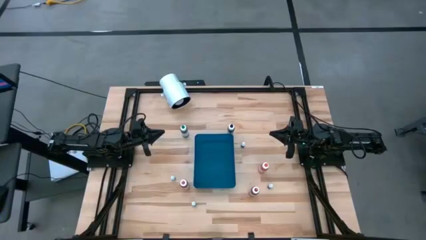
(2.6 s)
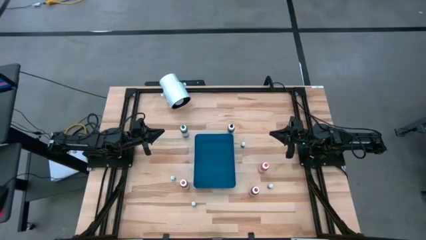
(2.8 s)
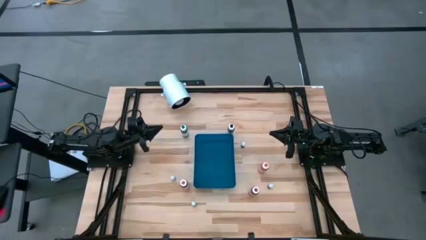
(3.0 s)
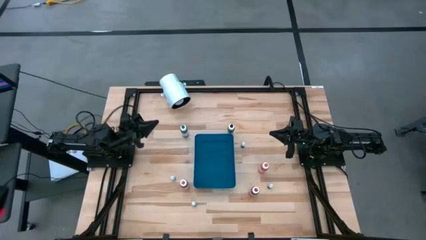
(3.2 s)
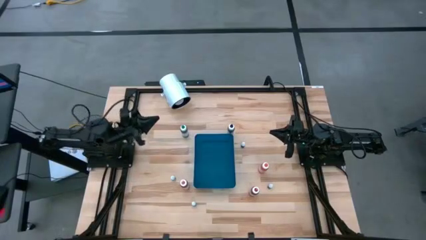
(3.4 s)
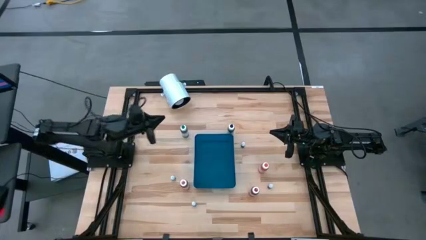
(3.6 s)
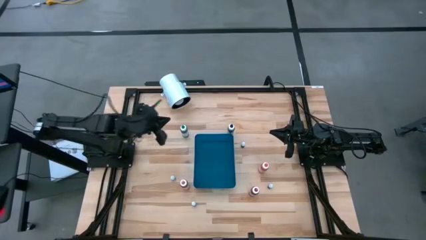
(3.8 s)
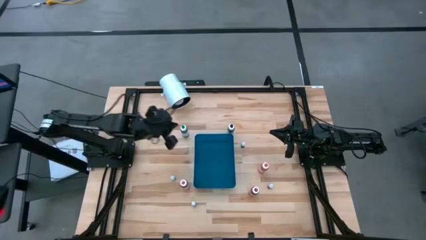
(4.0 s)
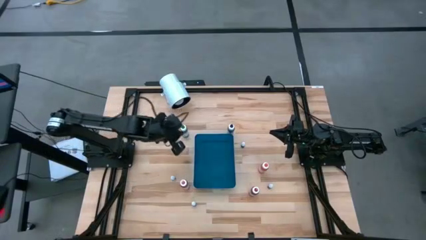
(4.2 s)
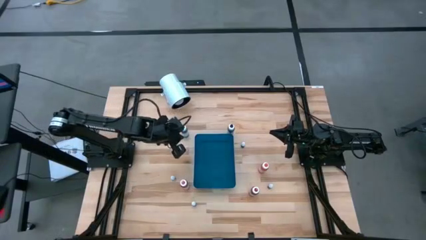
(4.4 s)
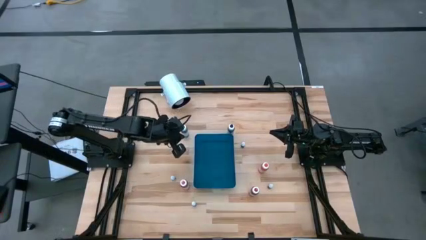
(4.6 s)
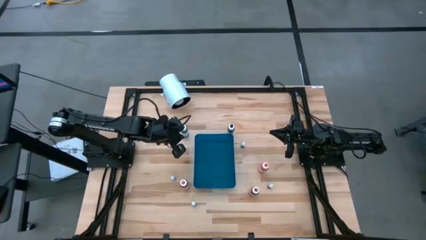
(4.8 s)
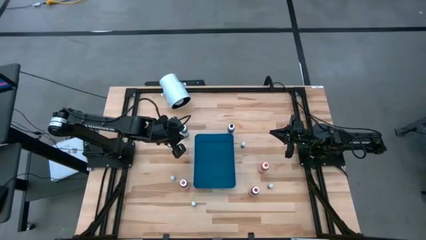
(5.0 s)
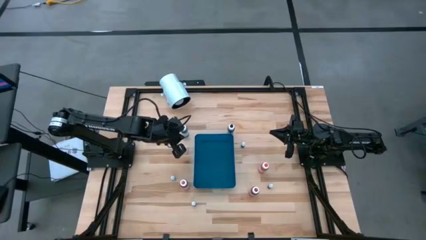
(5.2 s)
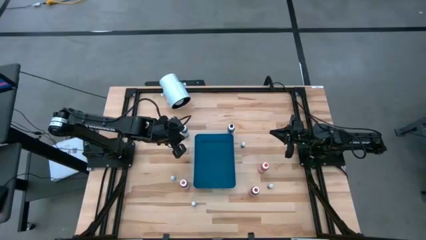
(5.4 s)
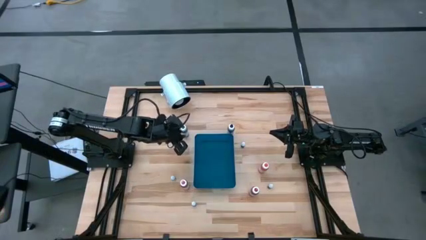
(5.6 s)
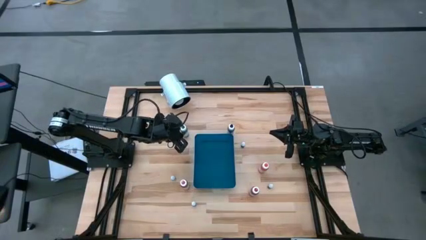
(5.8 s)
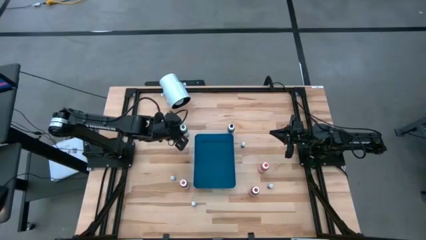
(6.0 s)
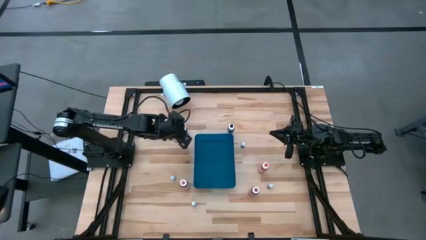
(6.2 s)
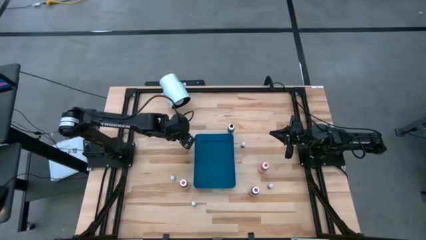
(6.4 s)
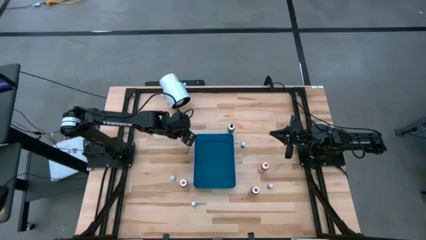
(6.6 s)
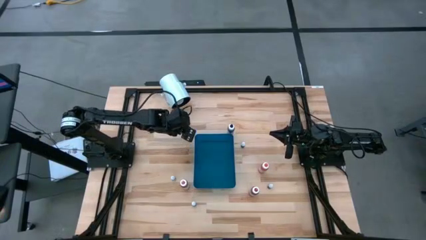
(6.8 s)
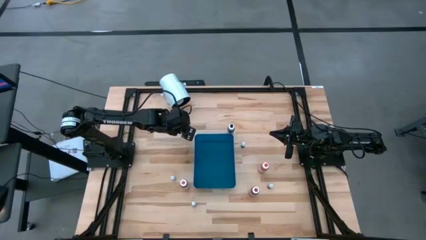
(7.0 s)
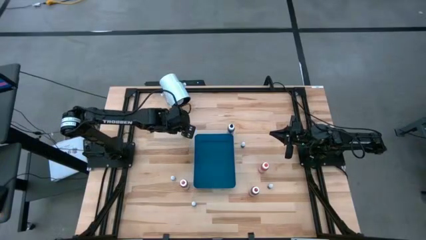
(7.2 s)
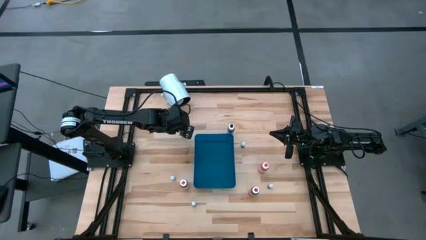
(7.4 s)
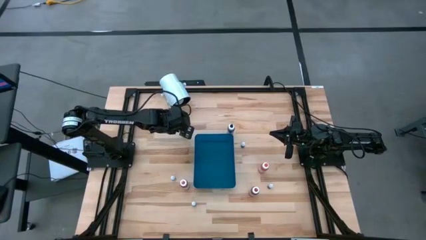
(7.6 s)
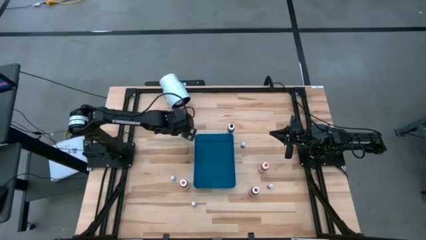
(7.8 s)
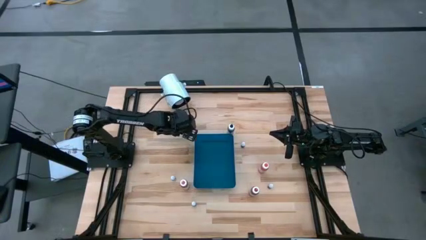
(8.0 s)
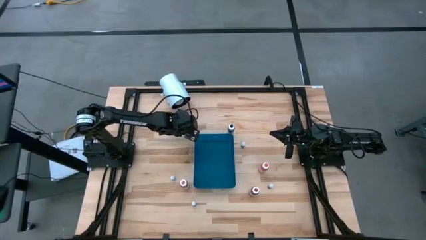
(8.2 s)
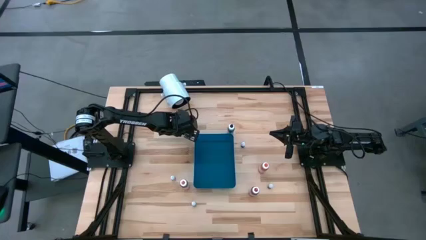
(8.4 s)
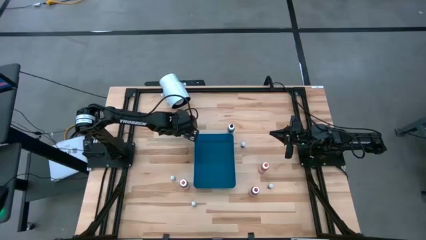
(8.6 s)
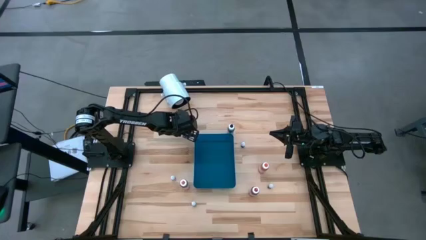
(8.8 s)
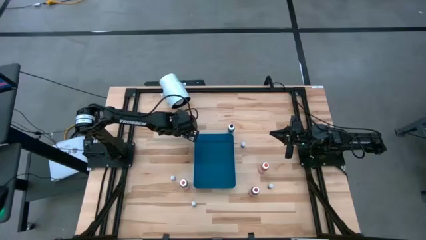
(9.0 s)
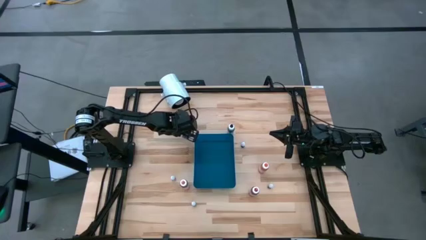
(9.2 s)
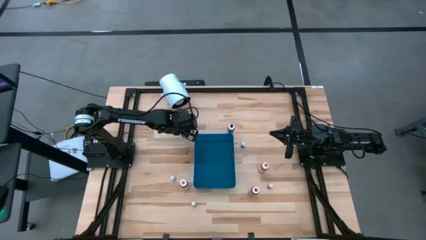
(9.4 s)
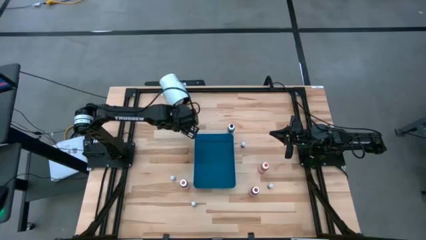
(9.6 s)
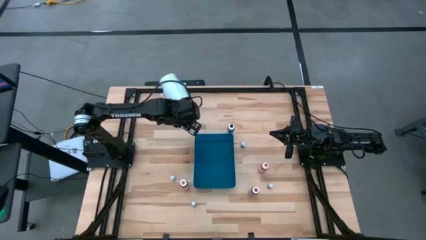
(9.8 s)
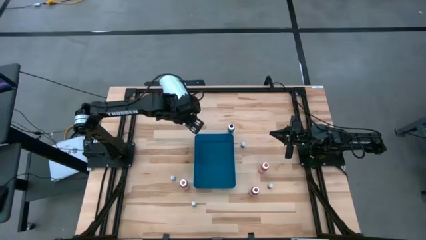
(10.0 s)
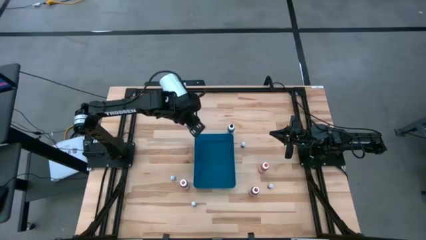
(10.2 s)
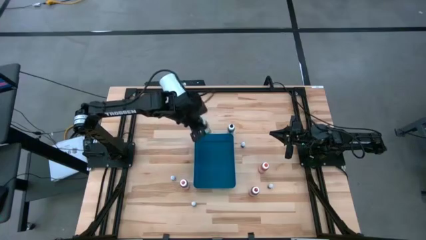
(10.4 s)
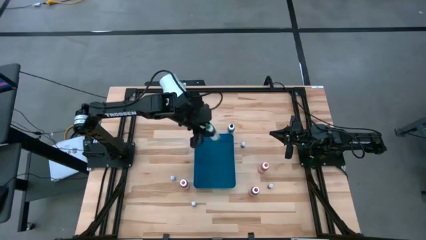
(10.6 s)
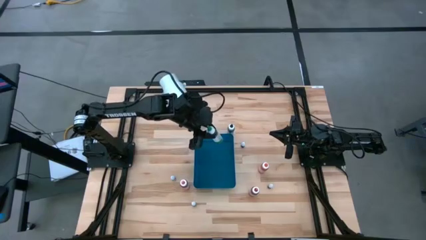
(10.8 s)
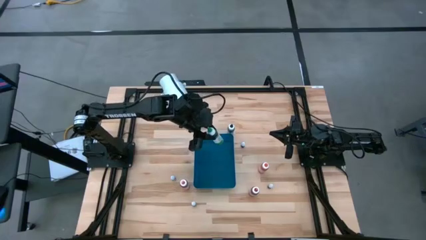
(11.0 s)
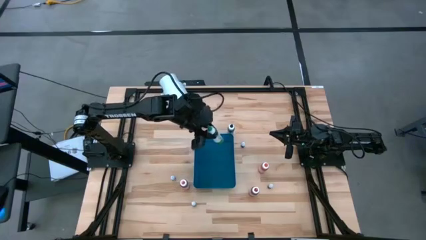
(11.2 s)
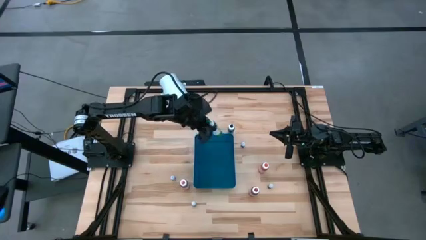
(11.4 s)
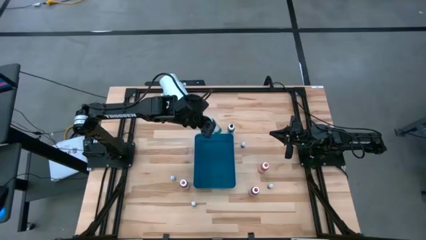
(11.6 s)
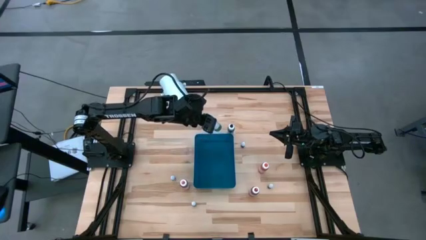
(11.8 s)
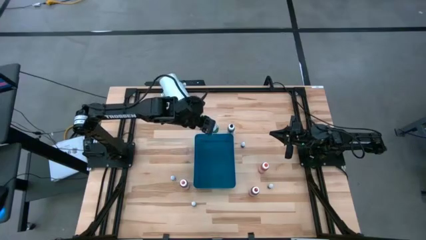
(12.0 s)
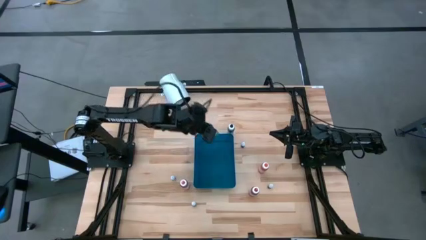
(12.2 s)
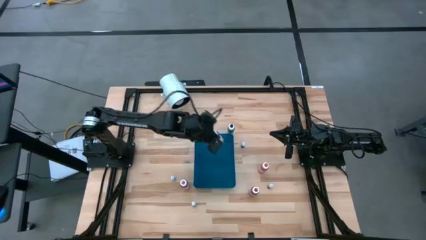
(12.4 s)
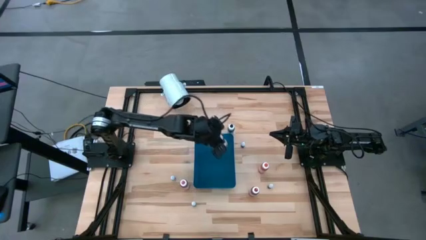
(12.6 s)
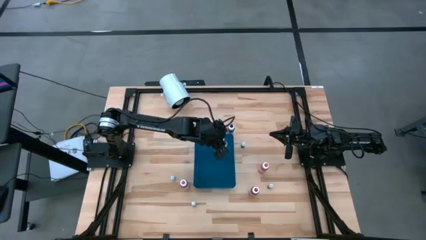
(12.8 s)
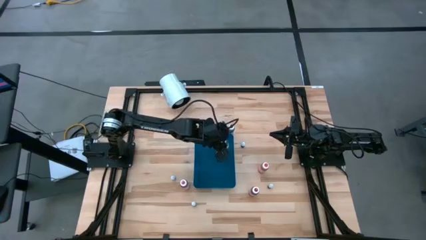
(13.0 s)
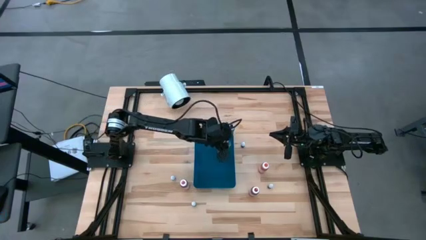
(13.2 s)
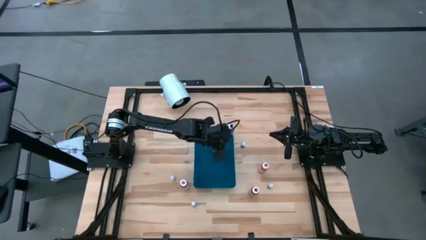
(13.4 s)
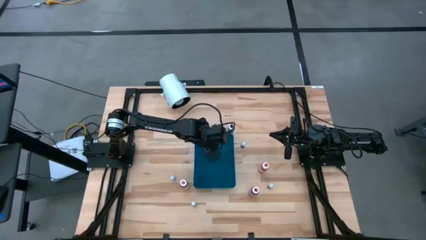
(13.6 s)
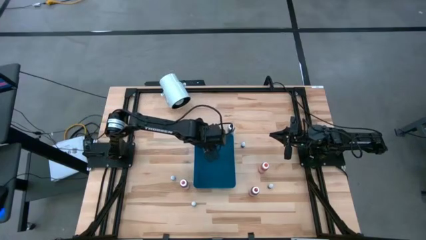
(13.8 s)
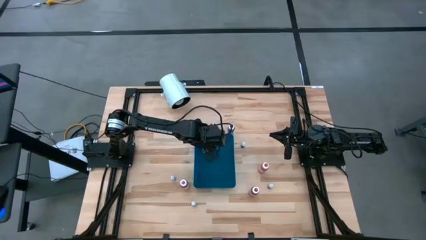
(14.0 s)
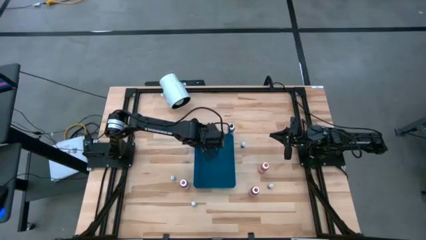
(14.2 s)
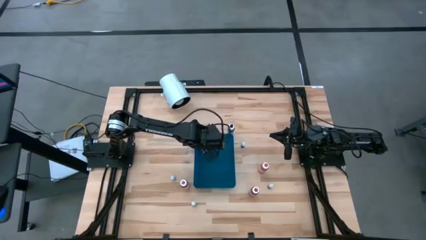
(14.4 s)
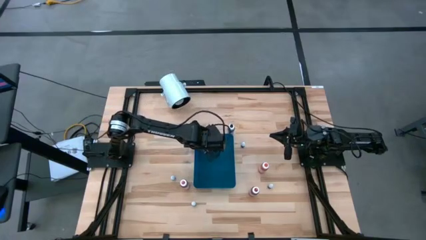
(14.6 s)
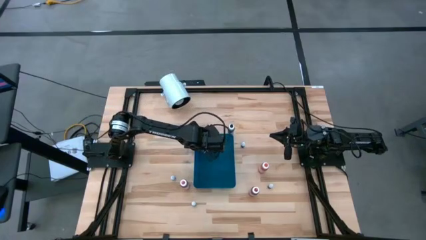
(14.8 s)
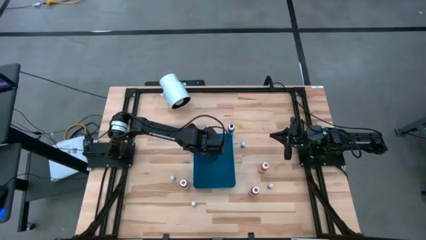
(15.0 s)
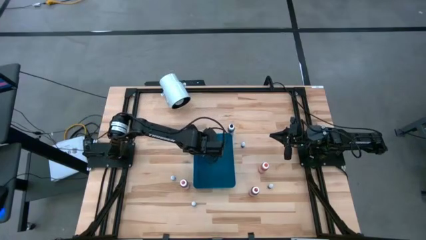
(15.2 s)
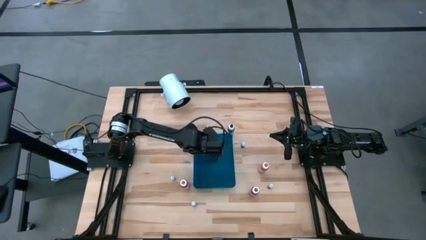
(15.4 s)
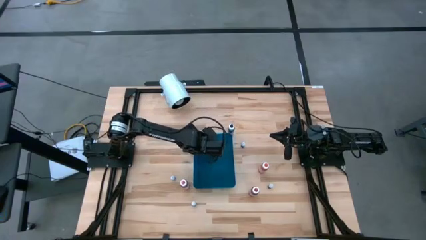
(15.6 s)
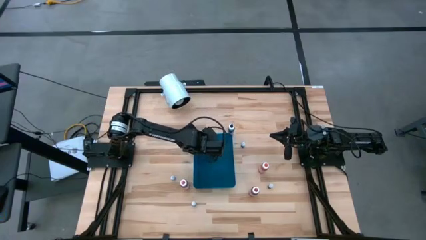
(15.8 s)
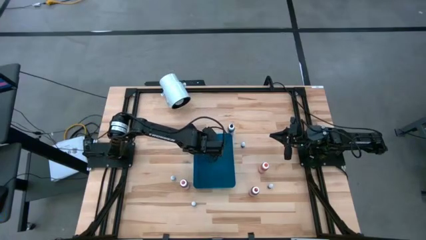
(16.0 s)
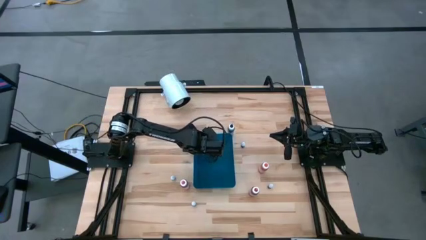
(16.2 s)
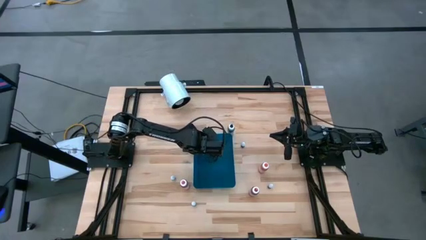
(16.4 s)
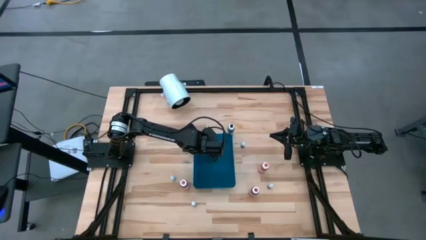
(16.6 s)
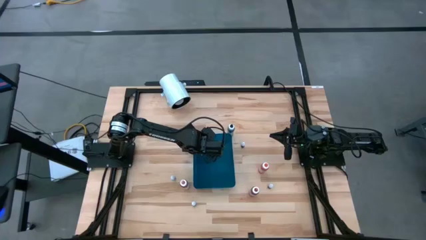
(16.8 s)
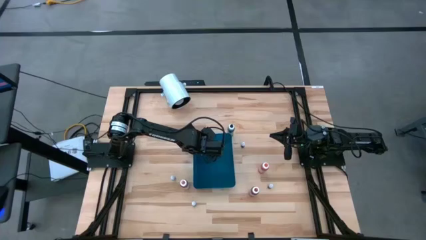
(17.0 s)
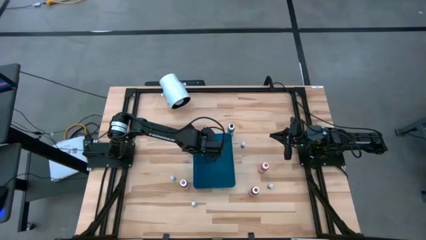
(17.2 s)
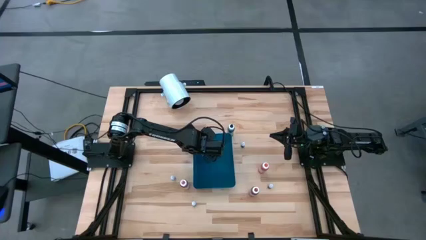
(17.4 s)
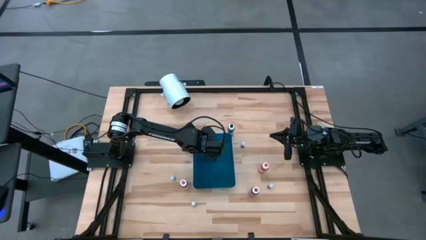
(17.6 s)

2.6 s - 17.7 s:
Task: Pick & Place food coloring
Put the large green food coloring bottle into the blue bin
